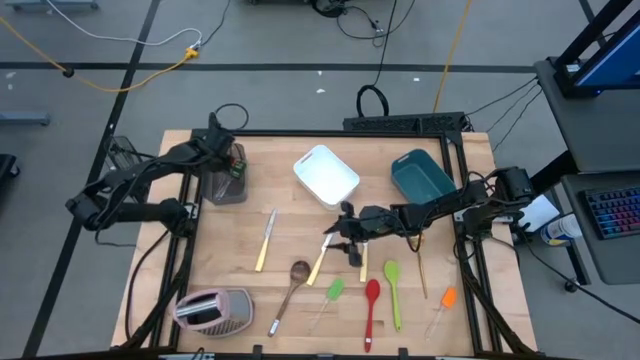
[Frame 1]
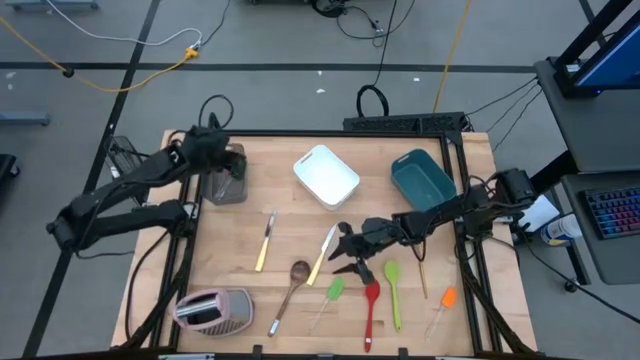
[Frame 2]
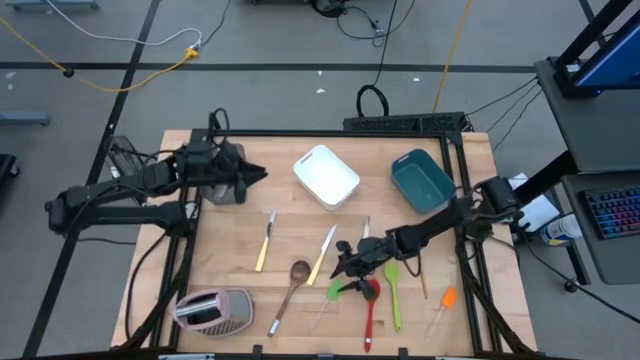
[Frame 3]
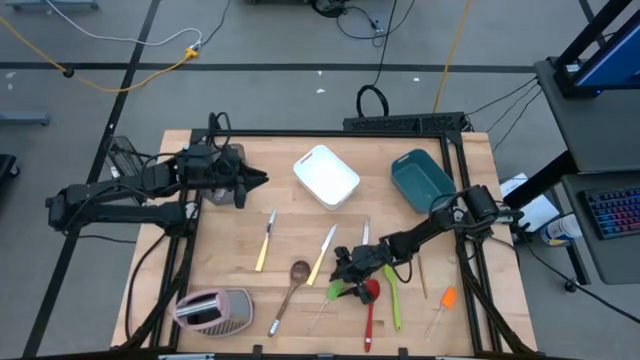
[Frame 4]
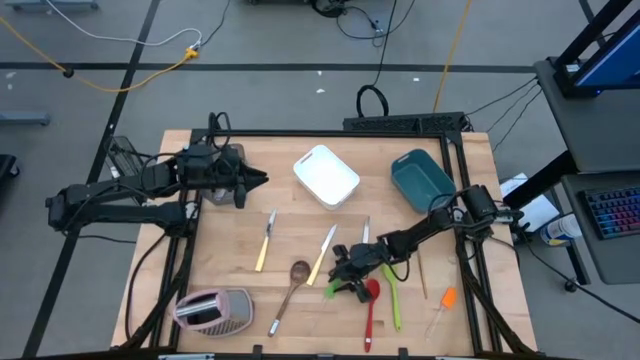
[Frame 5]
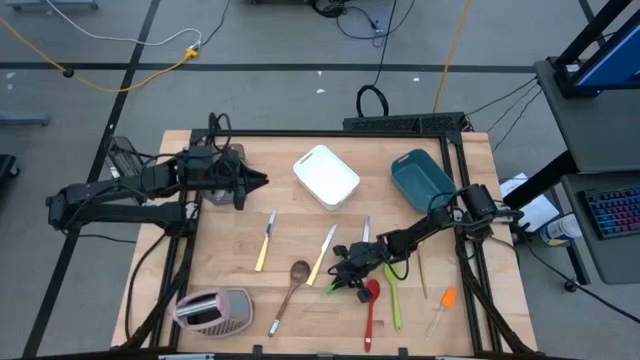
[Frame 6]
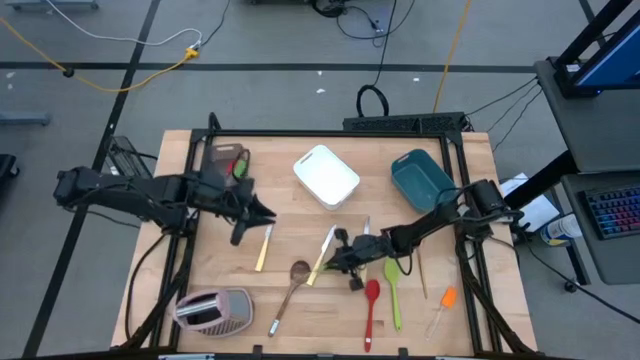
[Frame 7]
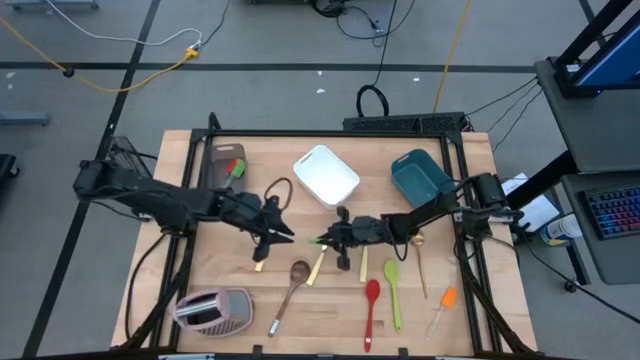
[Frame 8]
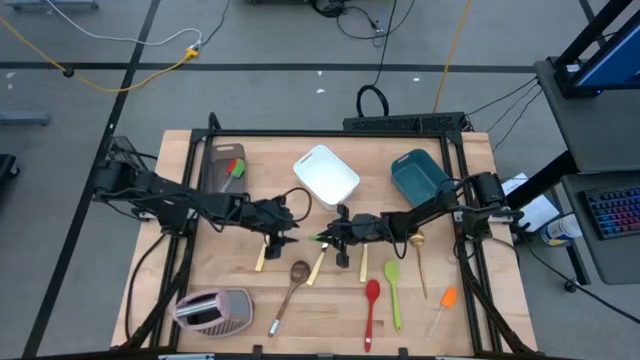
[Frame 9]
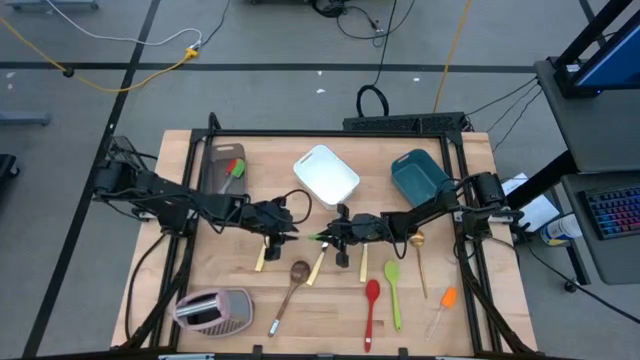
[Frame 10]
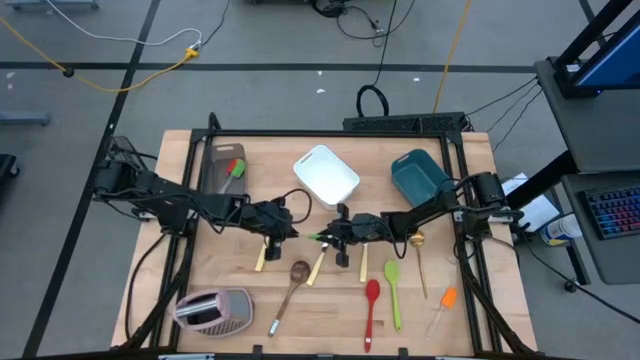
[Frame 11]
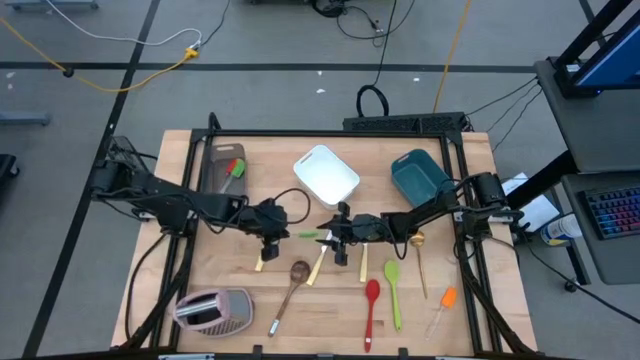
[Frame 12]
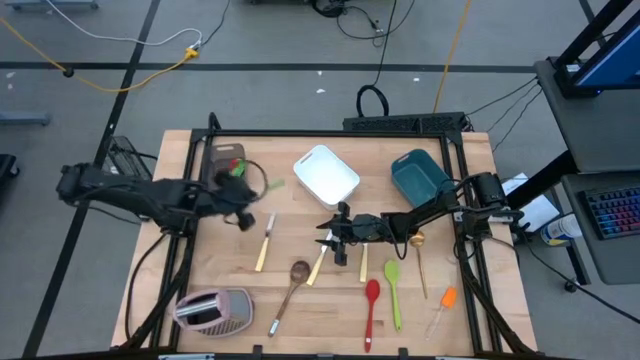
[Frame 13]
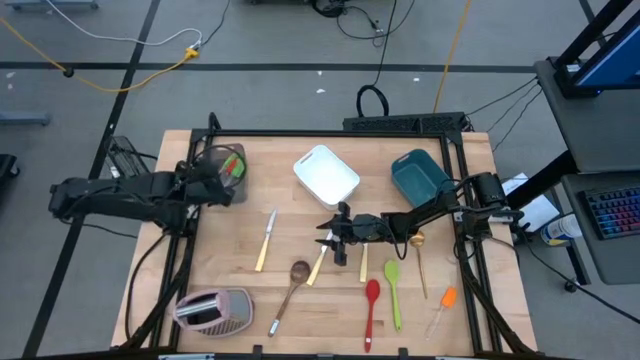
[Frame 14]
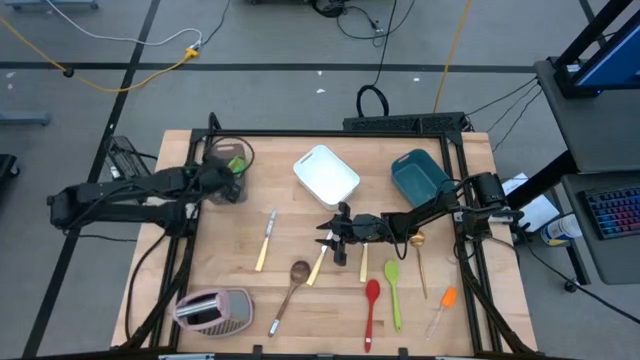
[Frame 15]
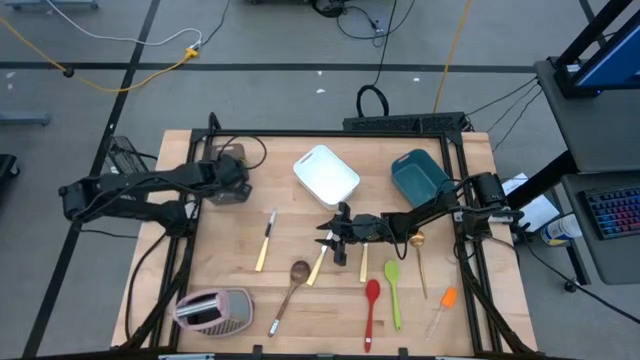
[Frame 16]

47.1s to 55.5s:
Task: Pick & Place Kitchen Items
Put the green spatula into the black bin

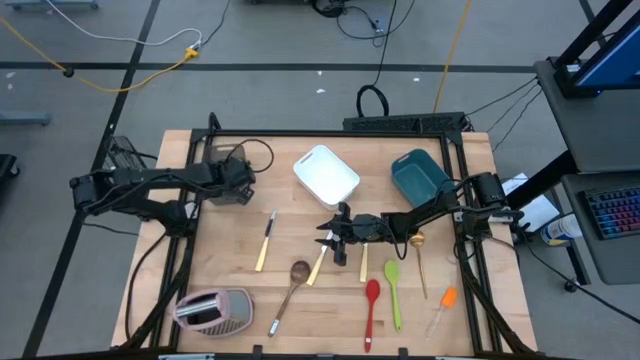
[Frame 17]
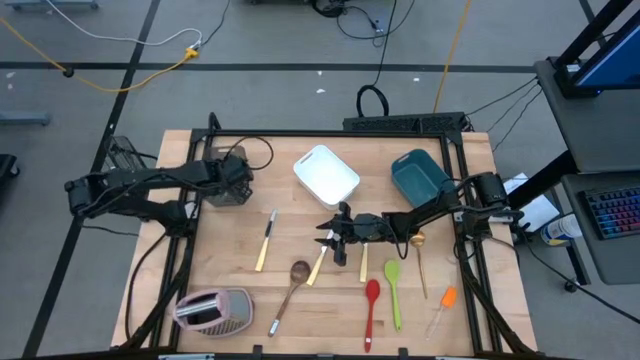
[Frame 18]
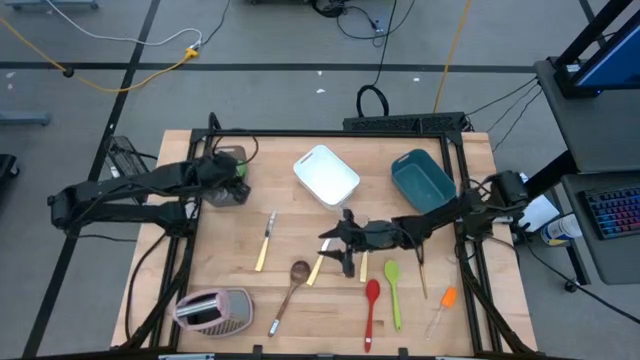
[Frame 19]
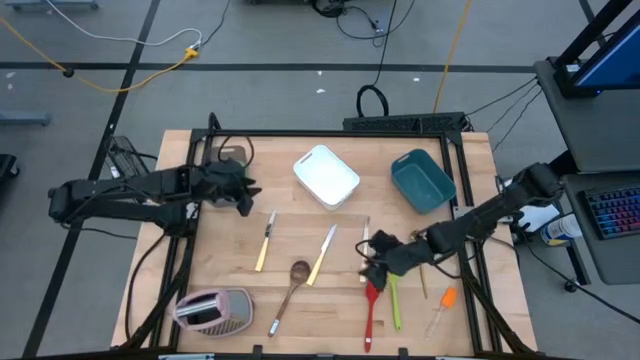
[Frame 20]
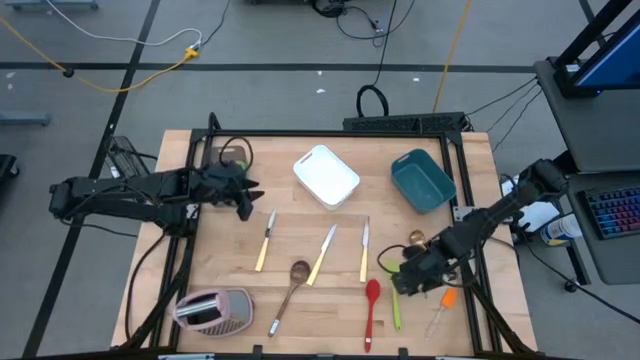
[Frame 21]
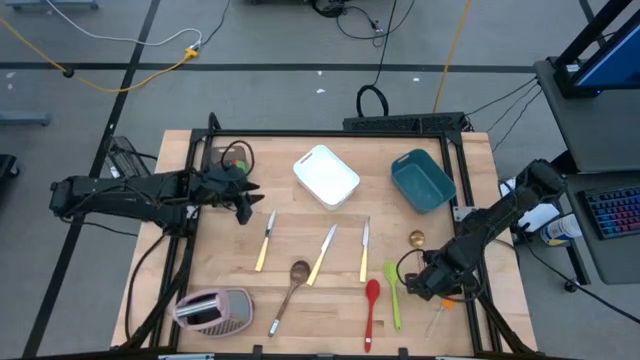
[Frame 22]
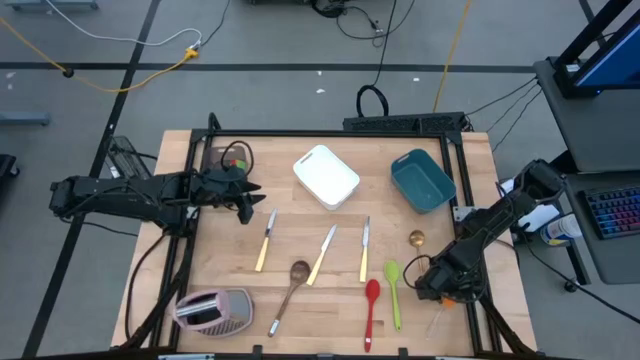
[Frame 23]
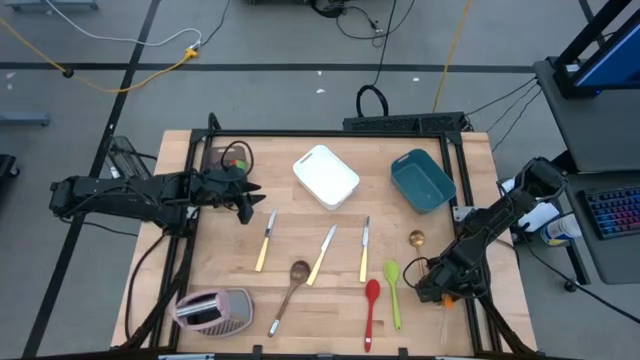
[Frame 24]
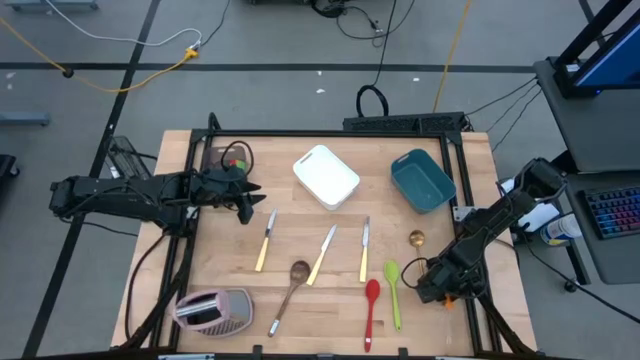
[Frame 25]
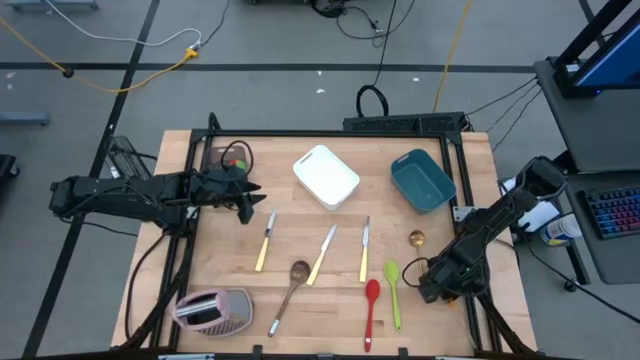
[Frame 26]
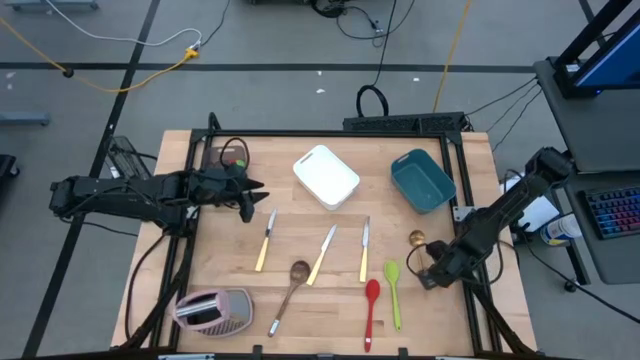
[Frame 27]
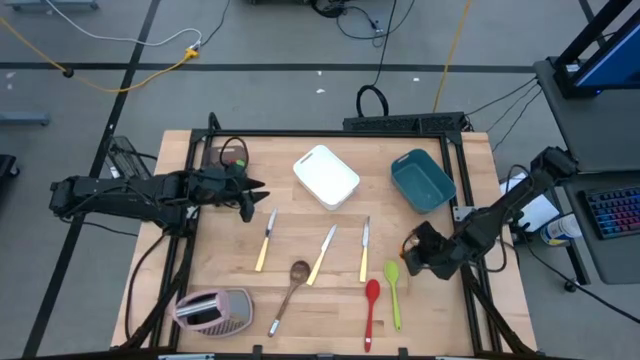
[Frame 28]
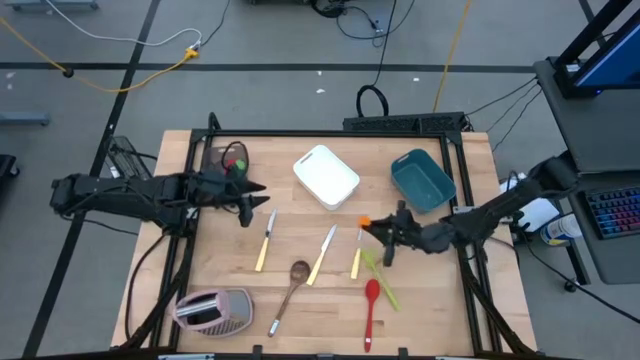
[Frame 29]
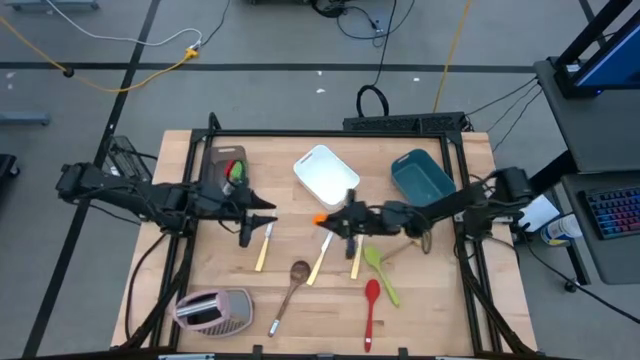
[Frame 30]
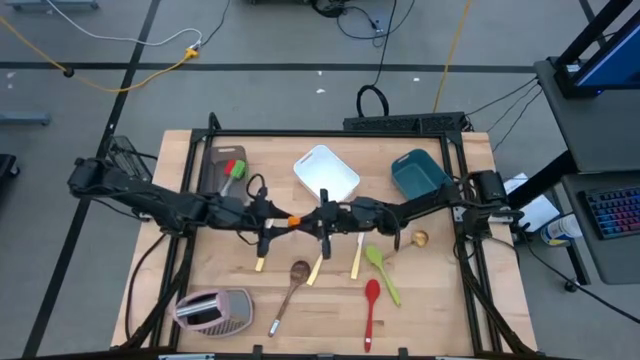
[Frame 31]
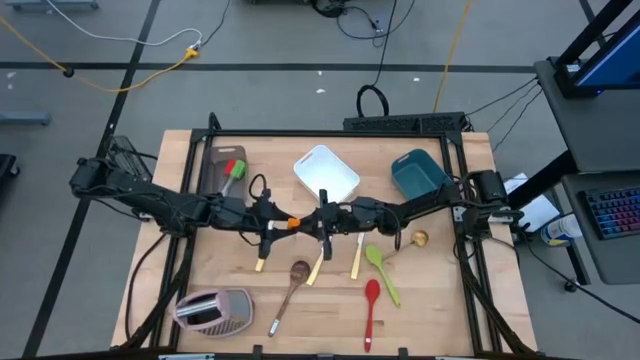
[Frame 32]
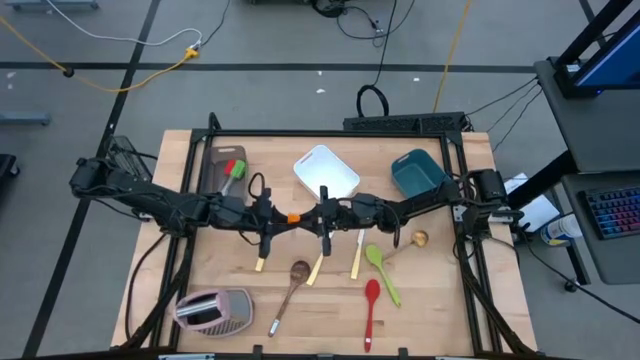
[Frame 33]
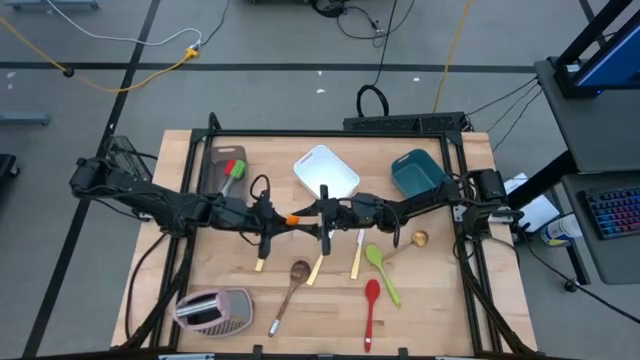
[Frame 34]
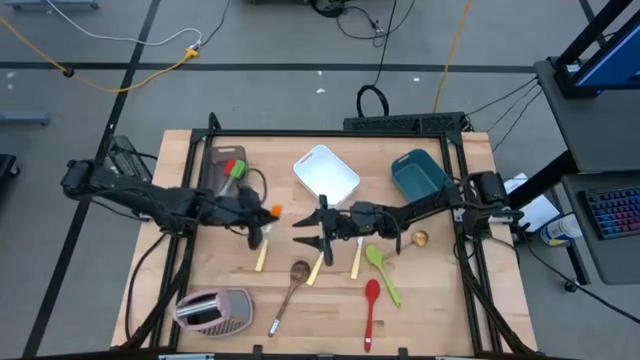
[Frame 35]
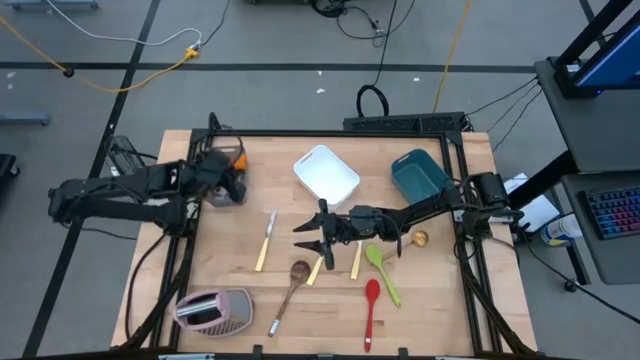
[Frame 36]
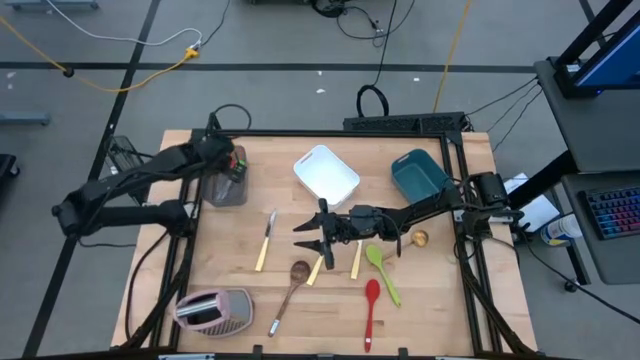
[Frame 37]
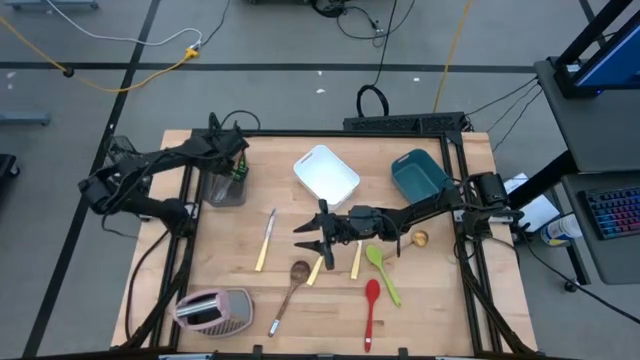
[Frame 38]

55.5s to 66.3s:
Put the orange spatula into the black bin

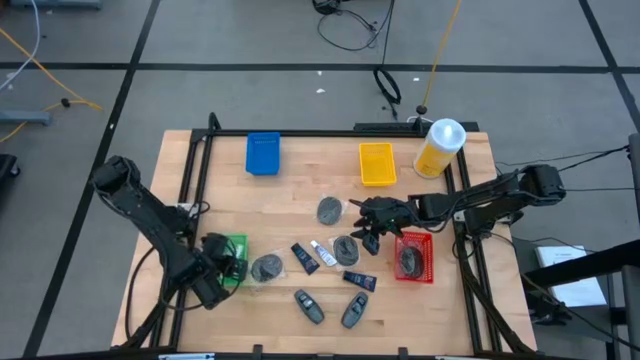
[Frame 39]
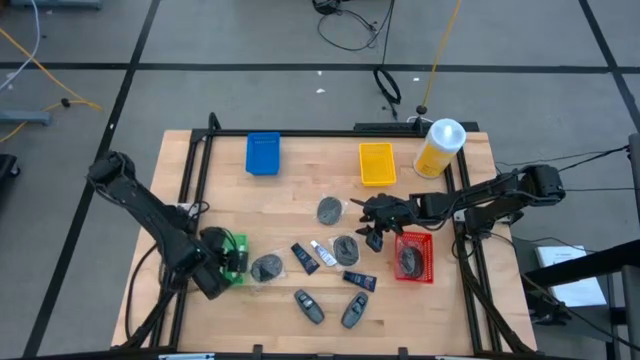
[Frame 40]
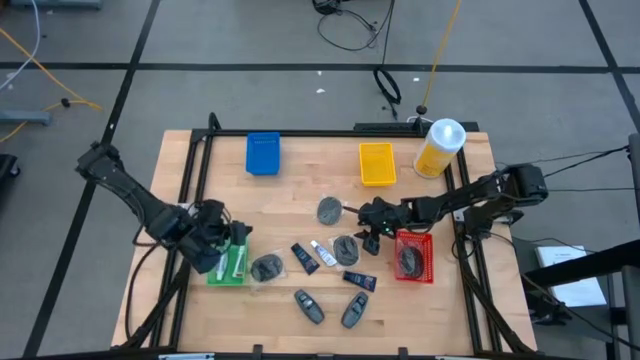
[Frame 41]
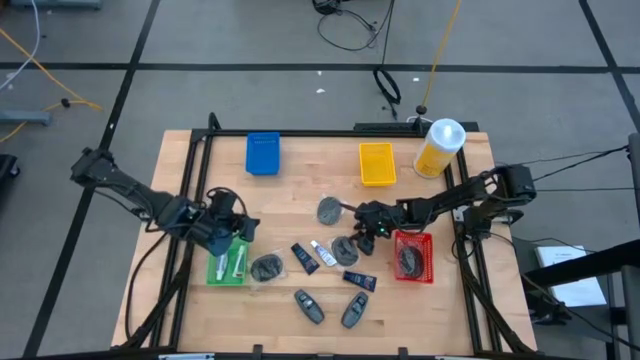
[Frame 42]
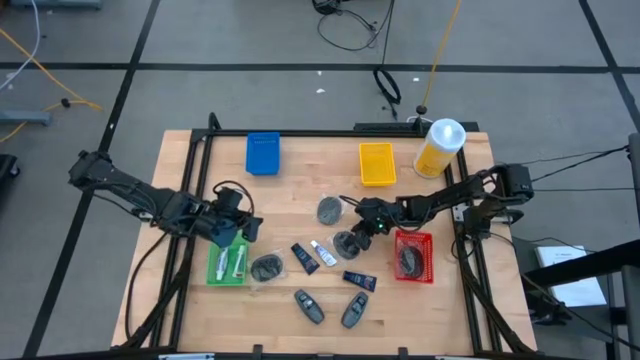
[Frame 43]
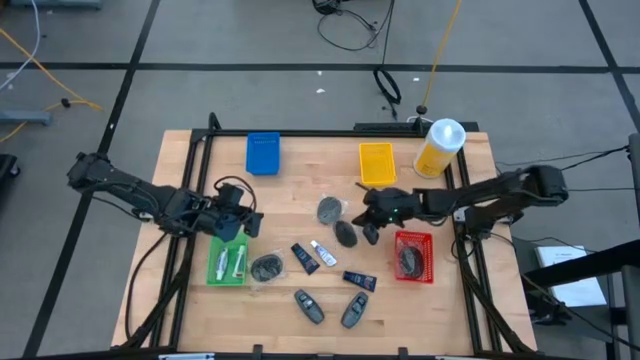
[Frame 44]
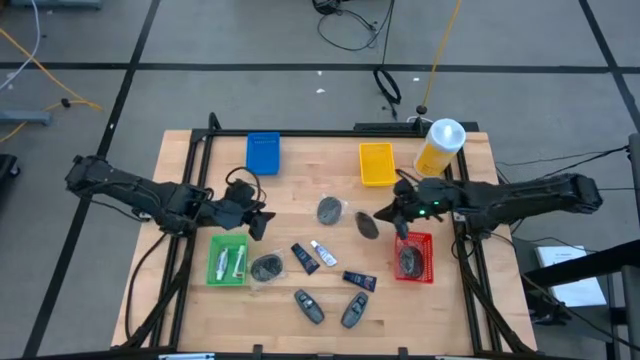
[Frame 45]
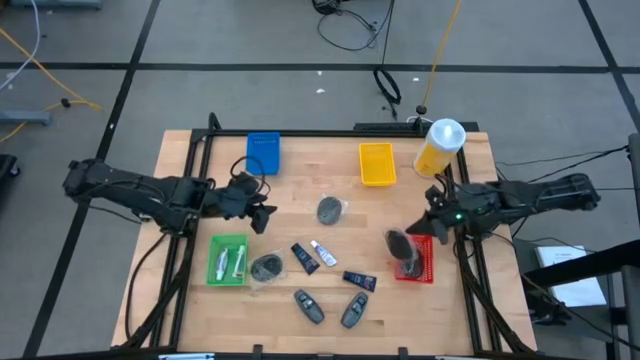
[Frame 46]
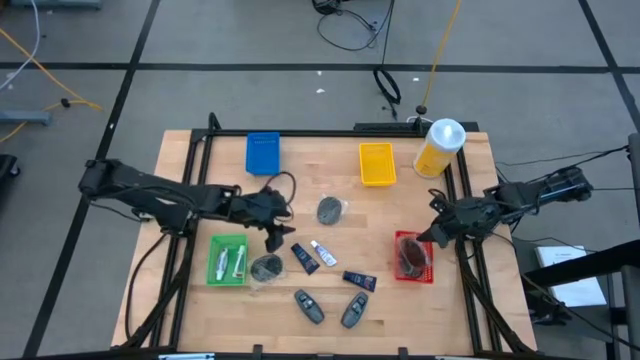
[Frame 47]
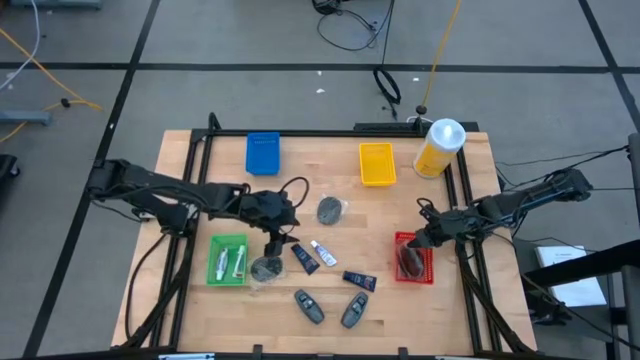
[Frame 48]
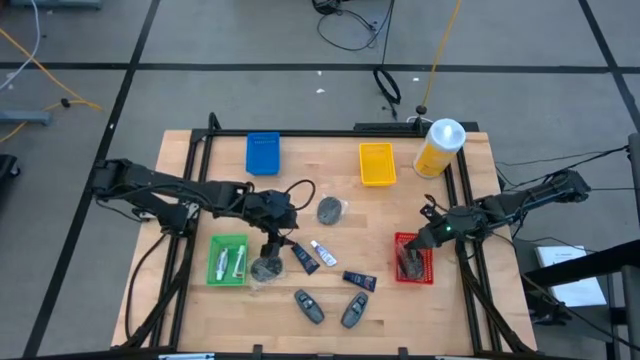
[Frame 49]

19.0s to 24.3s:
Task: Pick & Place Travel size toiletries
Put the black hairbrush into the red bin
